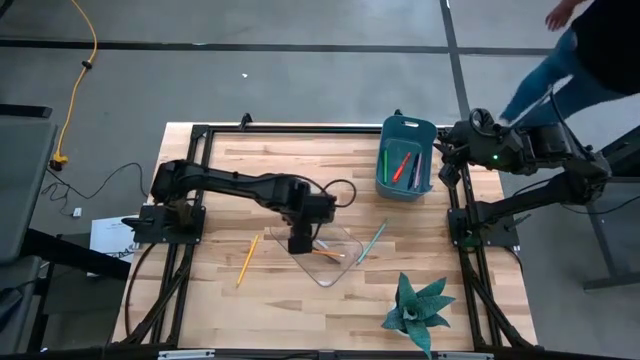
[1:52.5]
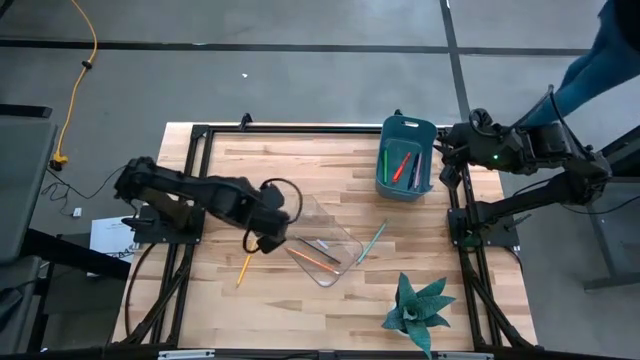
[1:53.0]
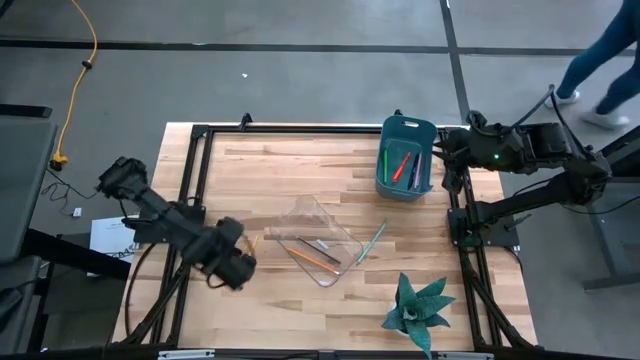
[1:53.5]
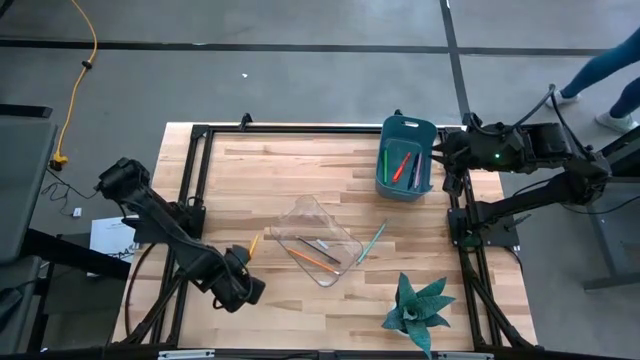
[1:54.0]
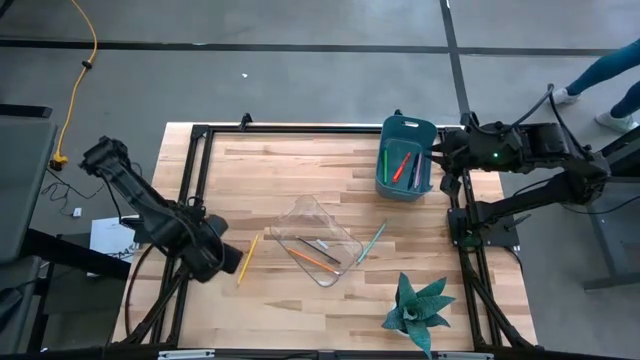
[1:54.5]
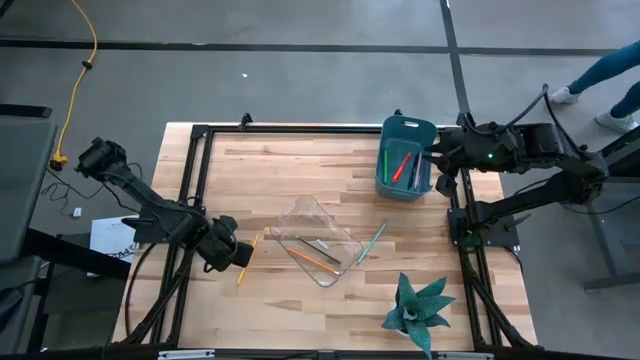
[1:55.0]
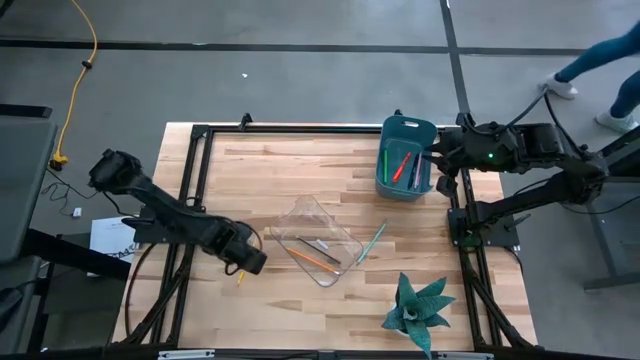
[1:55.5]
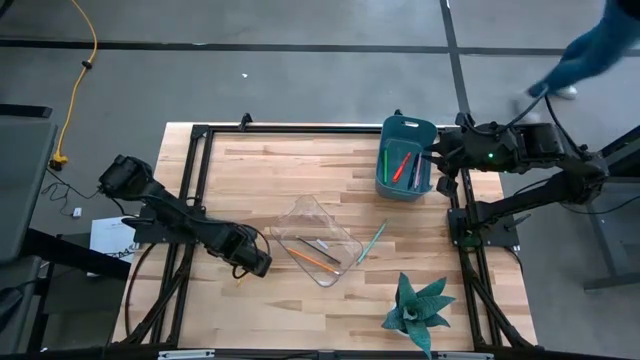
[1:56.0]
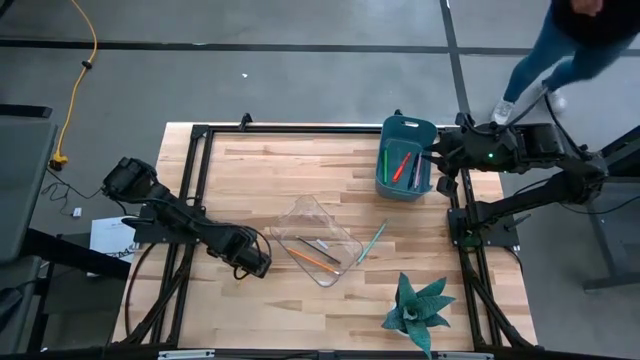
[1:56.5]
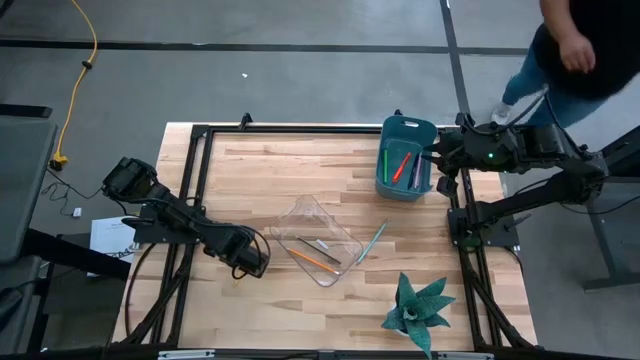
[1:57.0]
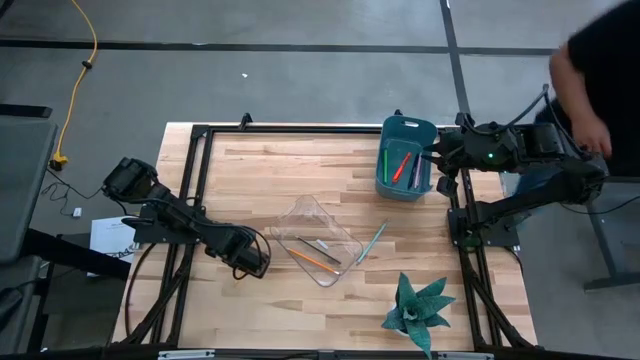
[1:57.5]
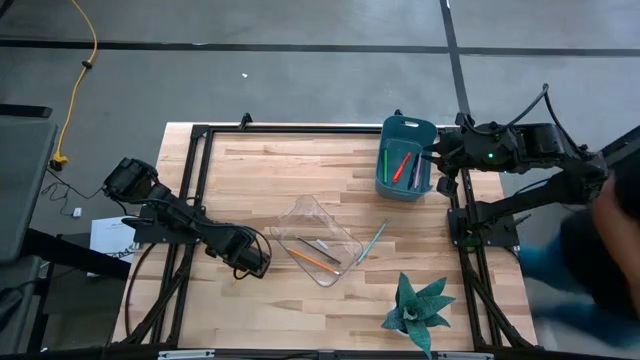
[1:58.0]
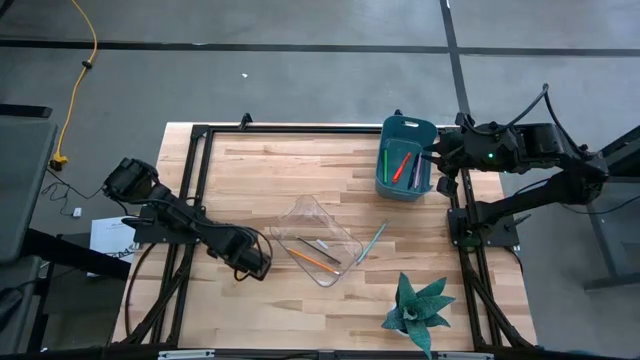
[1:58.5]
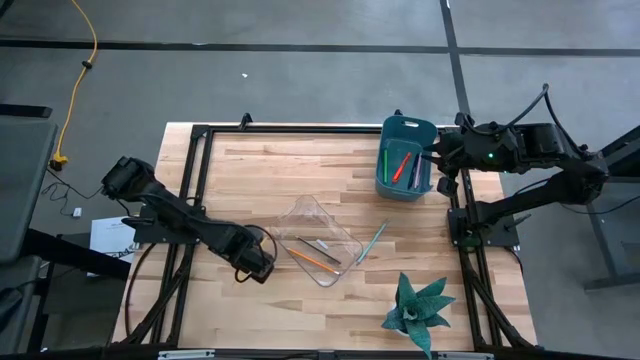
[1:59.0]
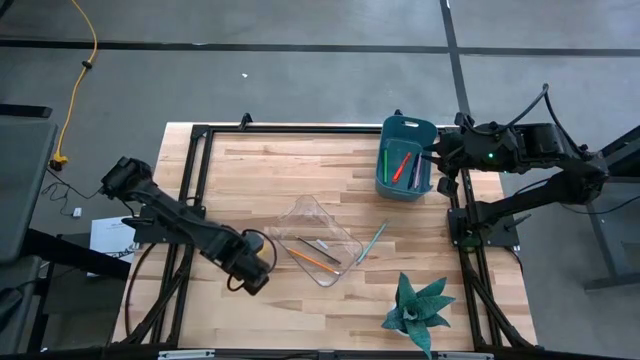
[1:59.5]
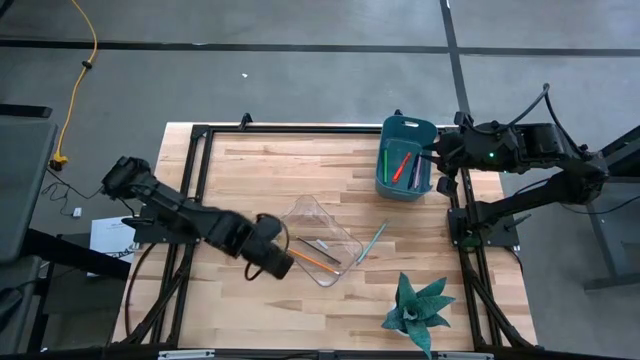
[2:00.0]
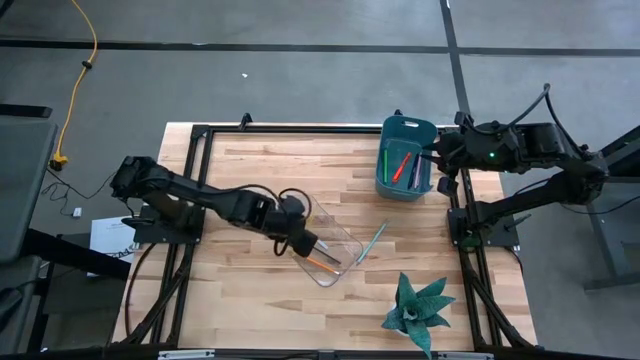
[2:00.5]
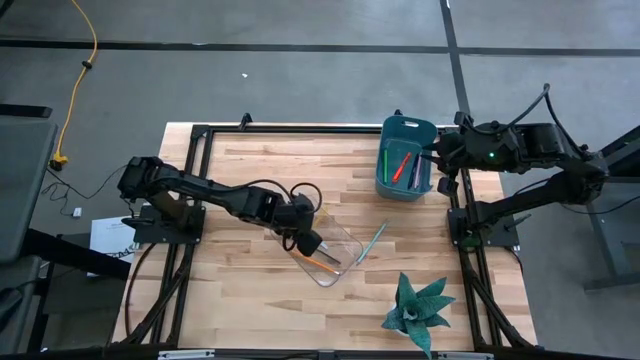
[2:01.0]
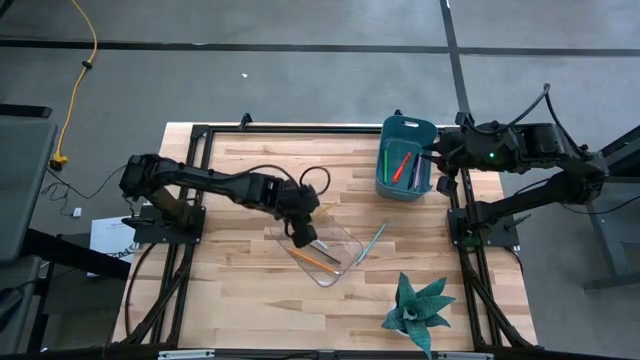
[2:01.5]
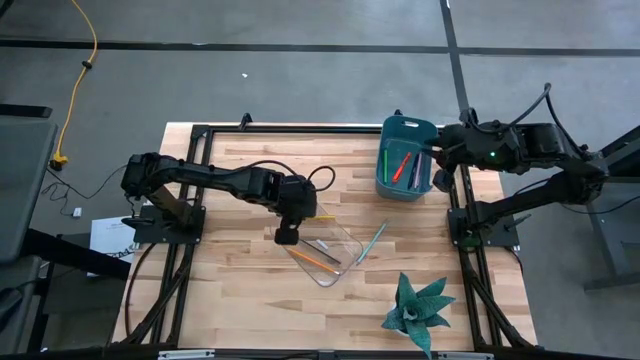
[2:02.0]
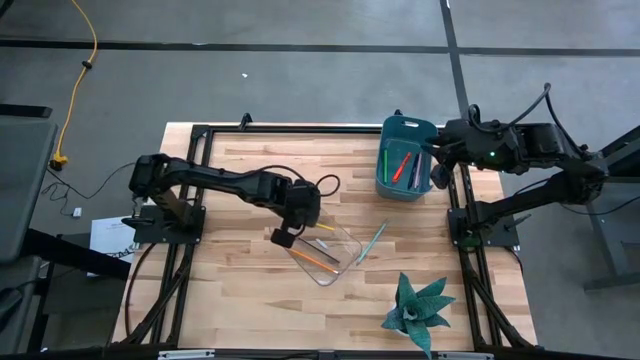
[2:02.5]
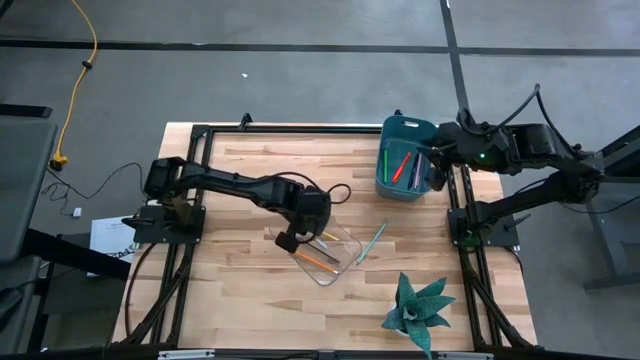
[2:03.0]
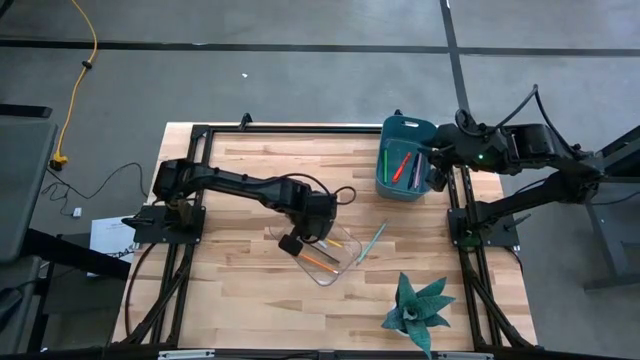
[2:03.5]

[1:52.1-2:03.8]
Task: Sort pens & pencils
Put the yellow pencil into the transparent bin

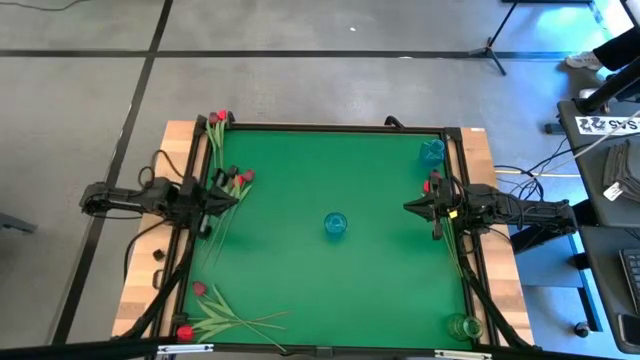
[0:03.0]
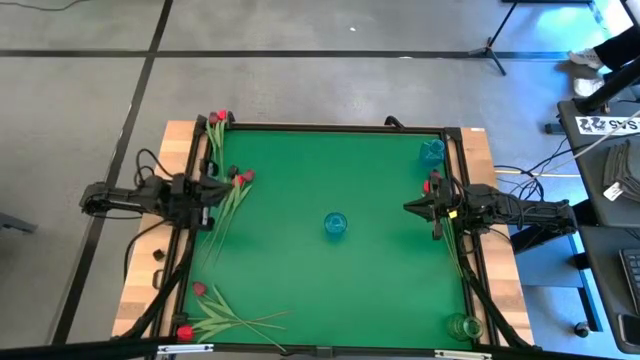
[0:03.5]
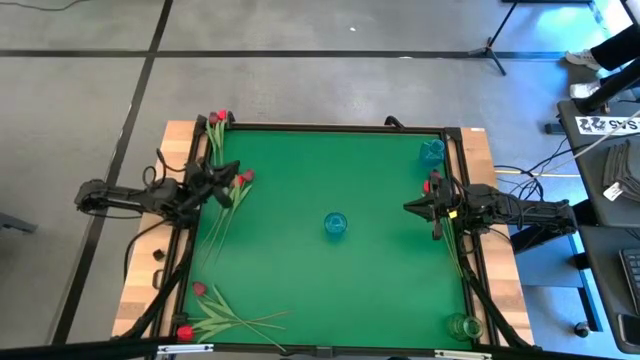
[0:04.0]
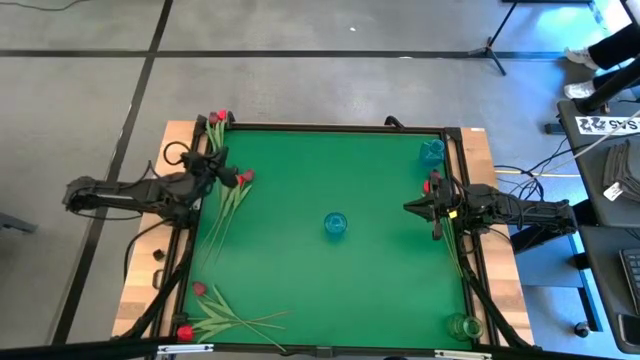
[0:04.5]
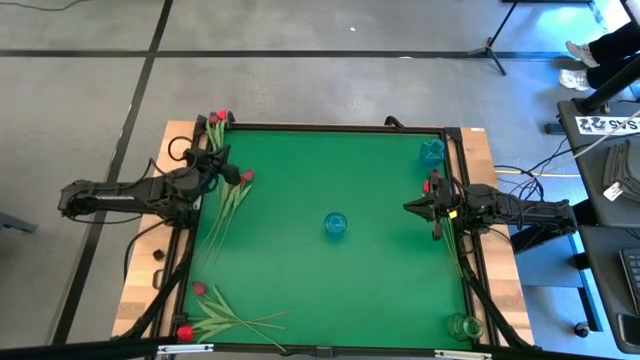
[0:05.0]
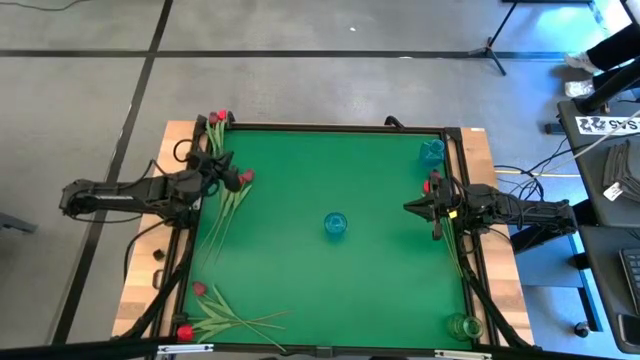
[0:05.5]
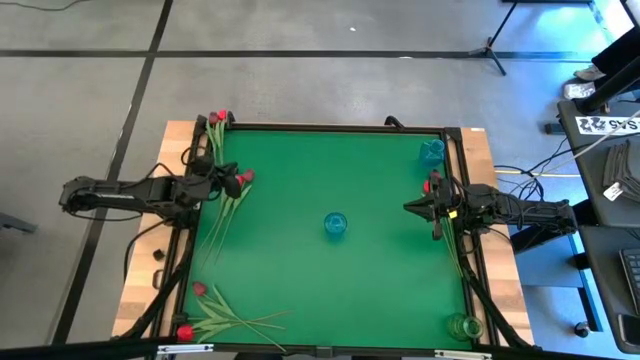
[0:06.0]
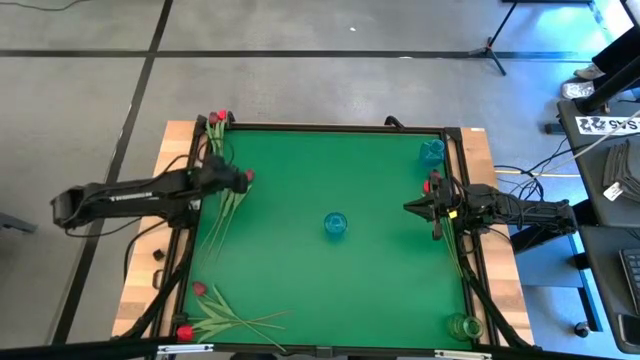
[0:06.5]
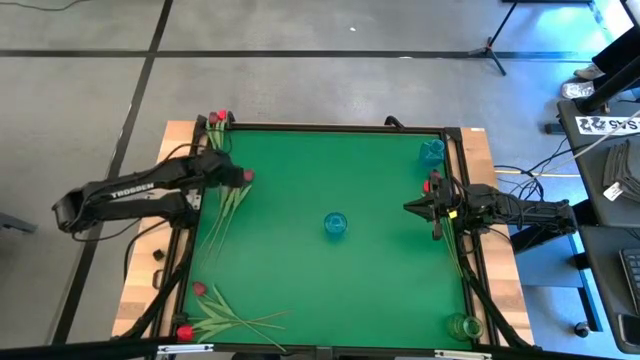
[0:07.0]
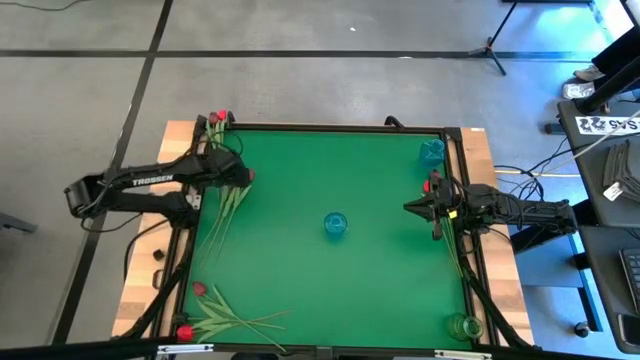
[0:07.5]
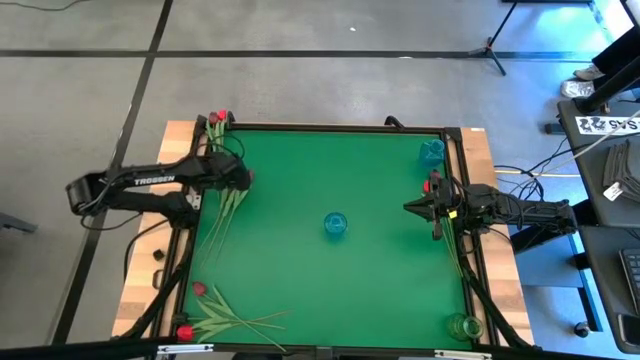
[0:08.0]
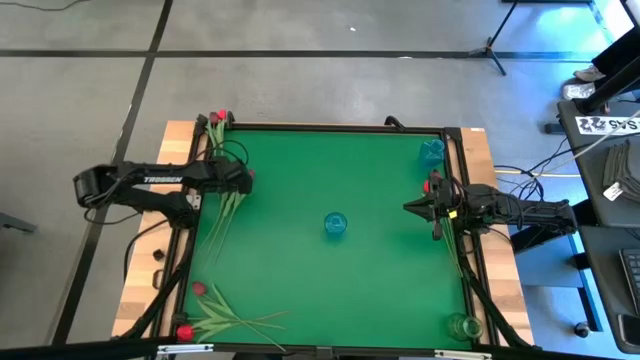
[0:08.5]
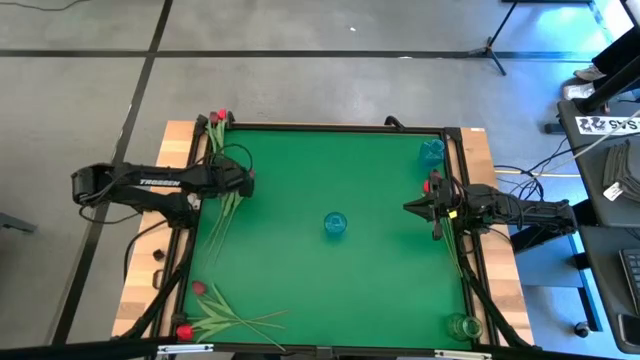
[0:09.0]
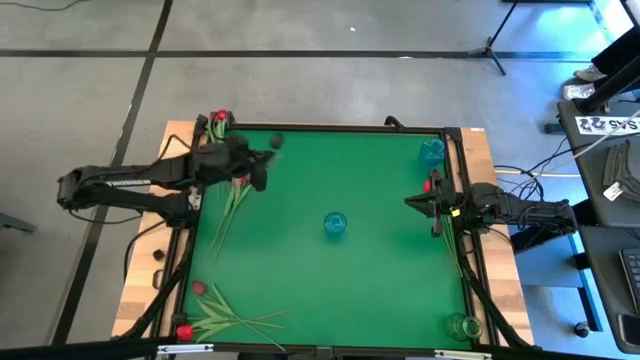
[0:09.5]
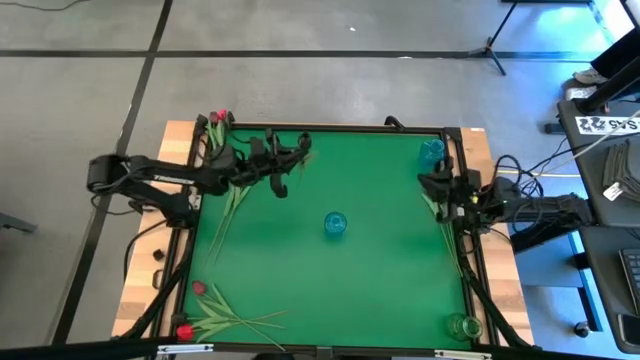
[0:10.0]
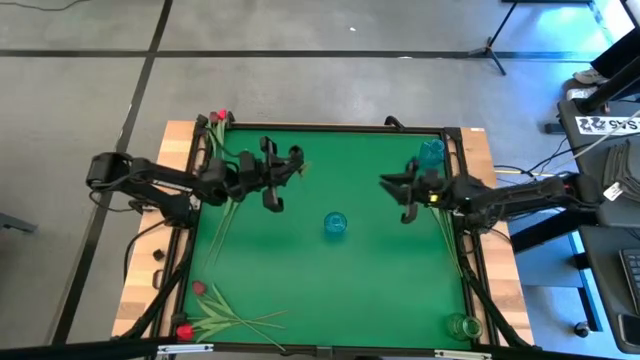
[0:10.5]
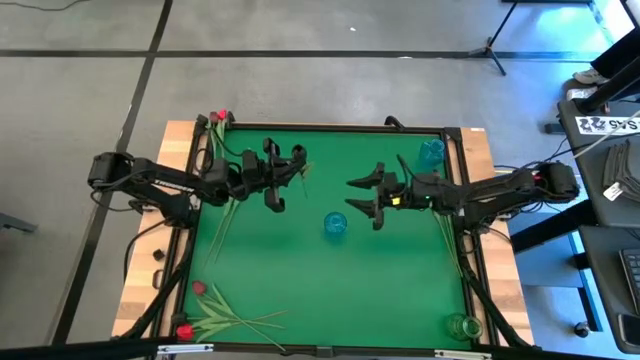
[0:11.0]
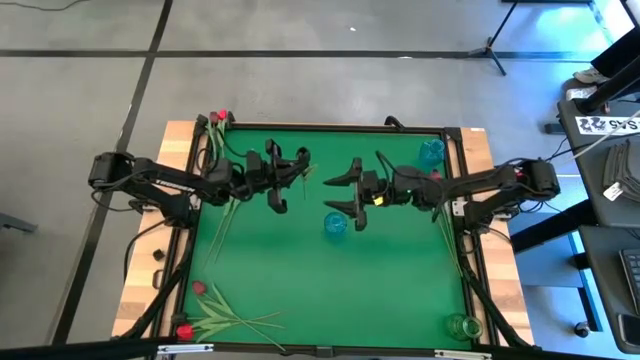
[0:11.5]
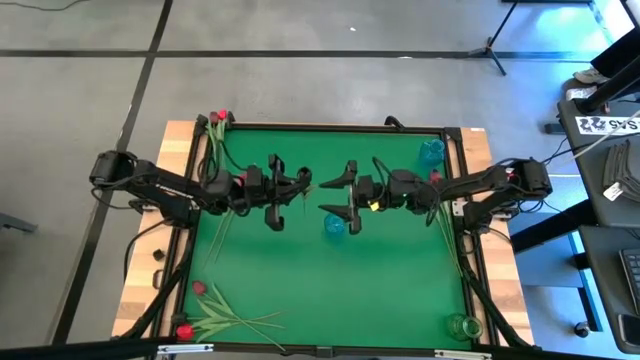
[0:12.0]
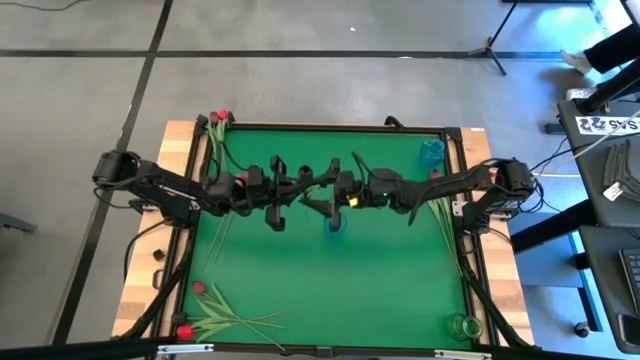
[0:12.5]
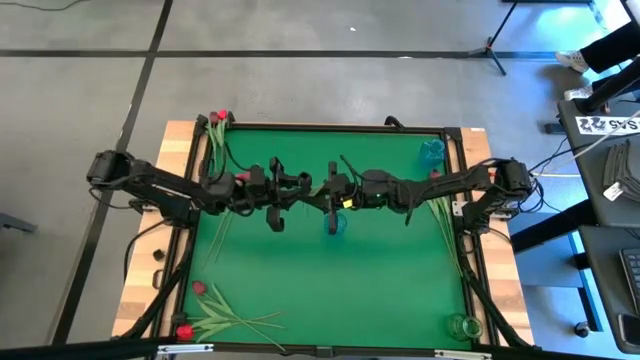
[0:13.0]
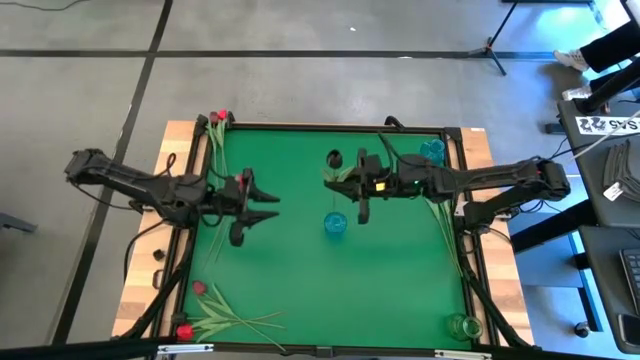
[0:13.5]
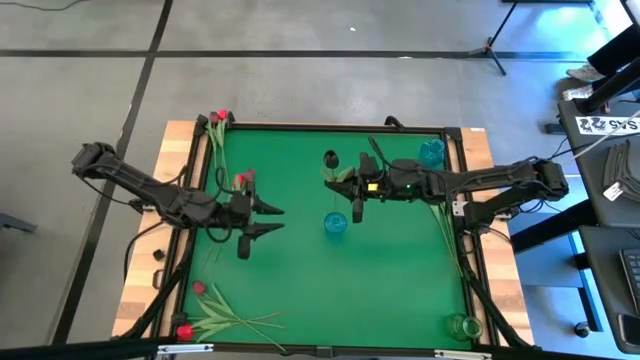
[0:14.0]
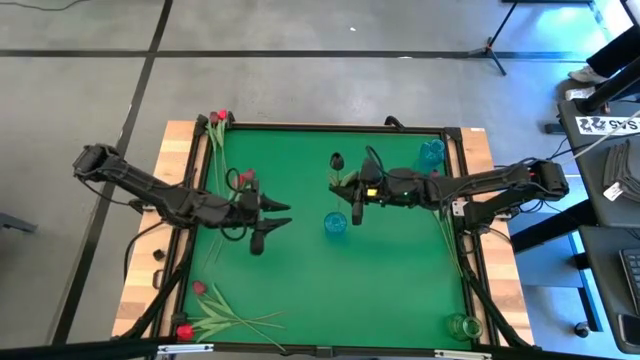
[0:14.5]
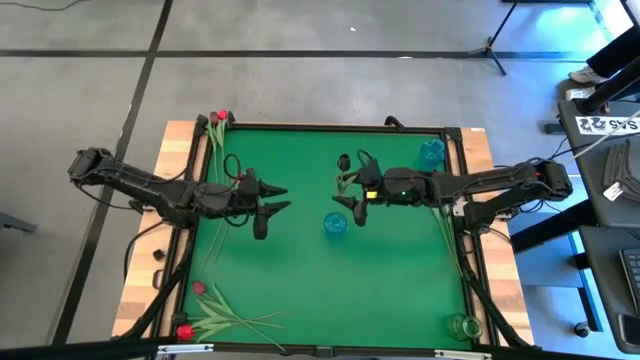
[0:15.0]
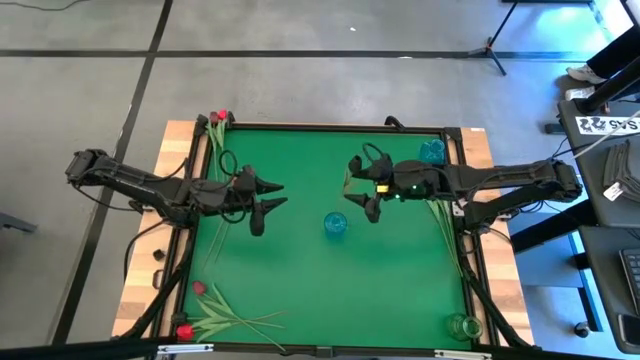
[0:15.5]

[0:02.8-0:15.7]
Task: Sort flowers into vase by color
Put the black tulip into the bottom blue vase
